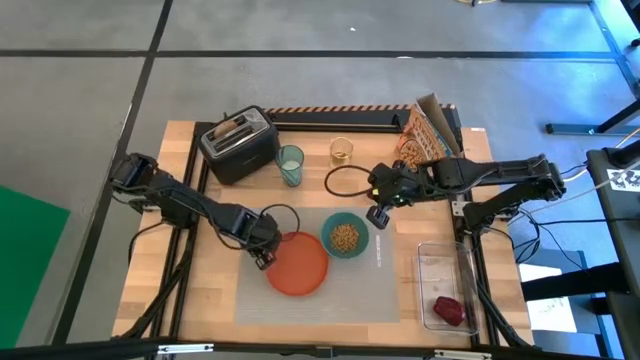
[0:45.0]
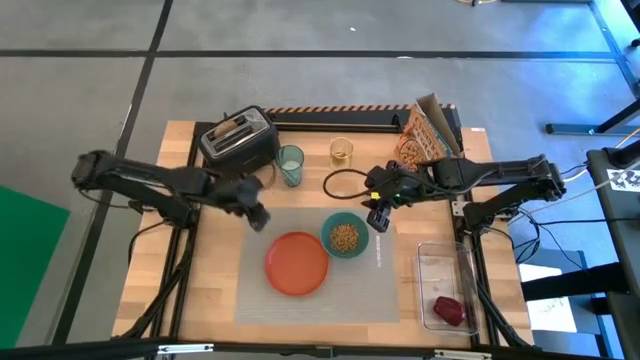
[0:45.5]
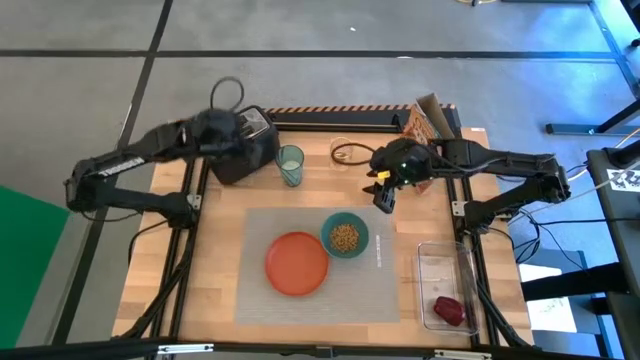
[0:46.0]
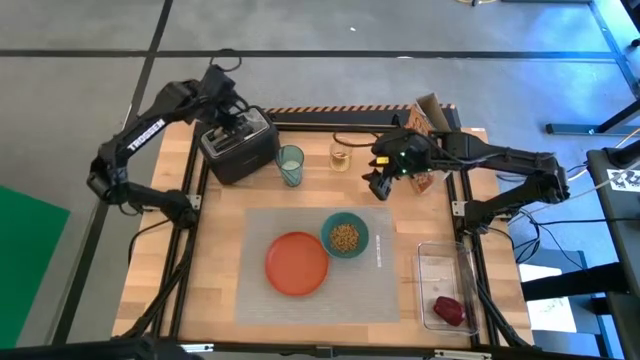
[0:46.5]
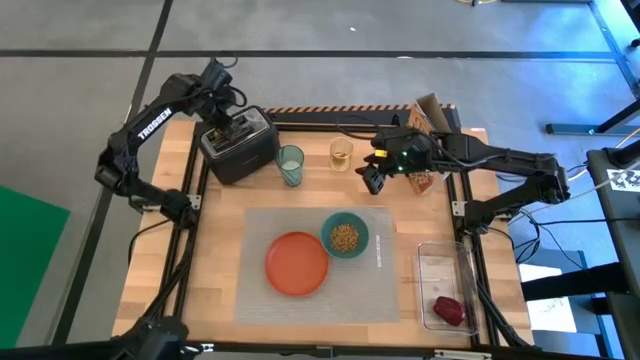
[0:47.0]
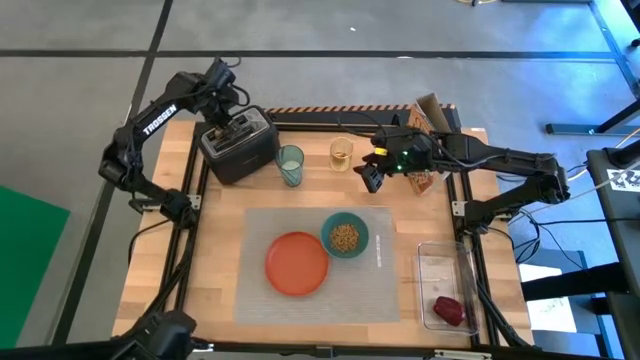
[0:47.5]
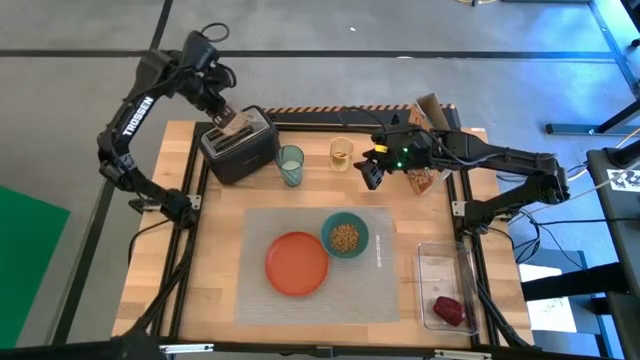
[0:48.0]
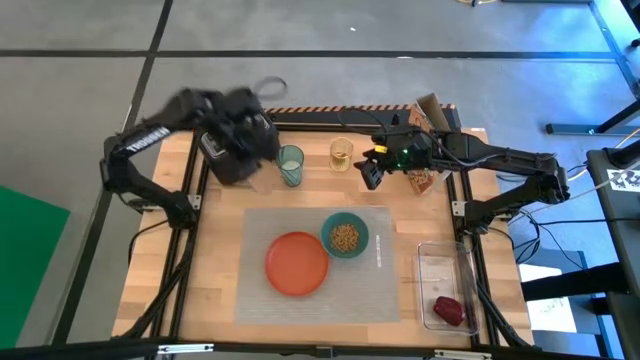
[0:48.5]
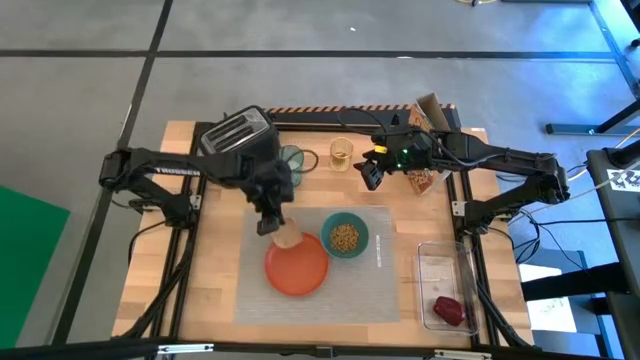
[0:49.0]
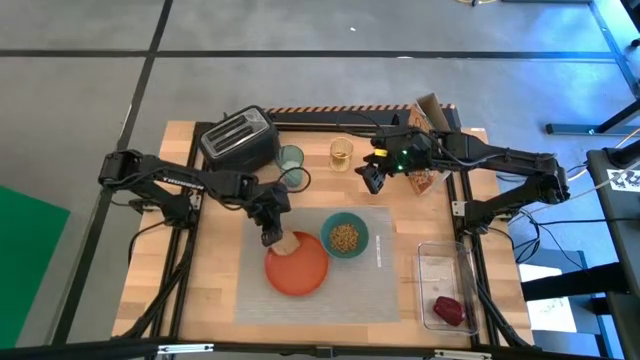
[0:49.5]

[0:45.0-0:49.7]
Task: Arrange a breakfast setting
Put the toasted bread on the plate

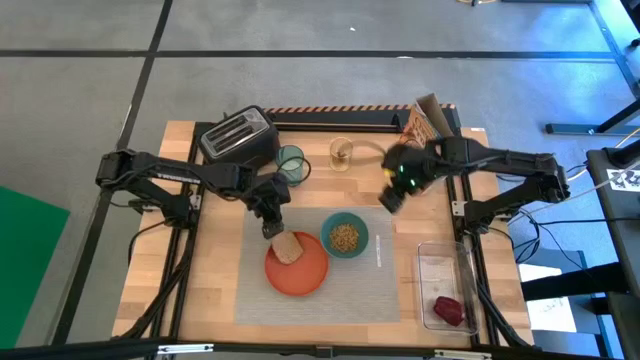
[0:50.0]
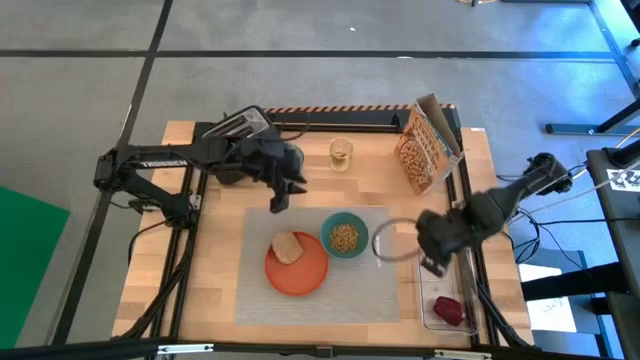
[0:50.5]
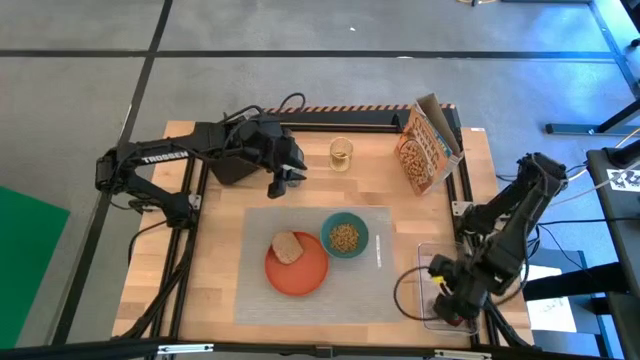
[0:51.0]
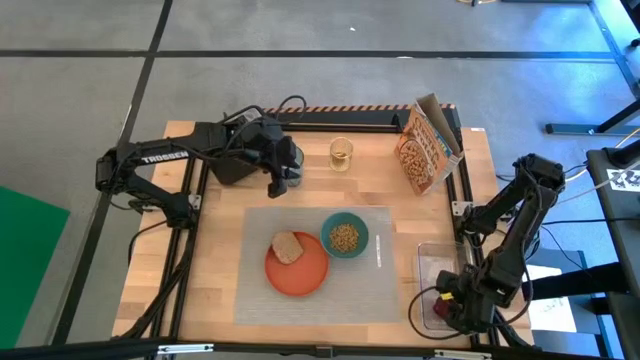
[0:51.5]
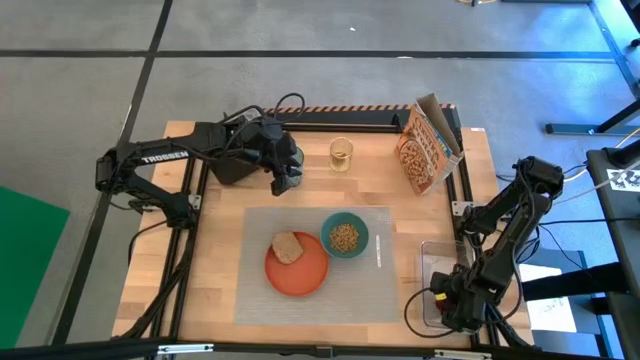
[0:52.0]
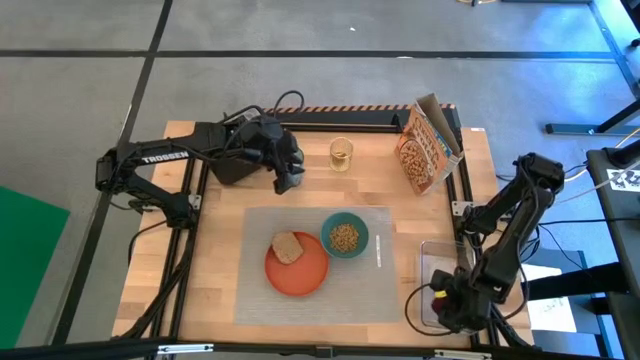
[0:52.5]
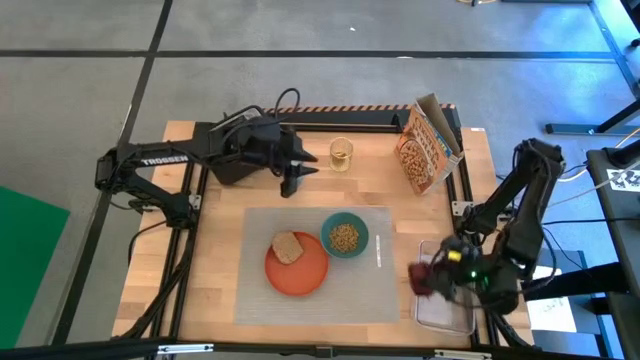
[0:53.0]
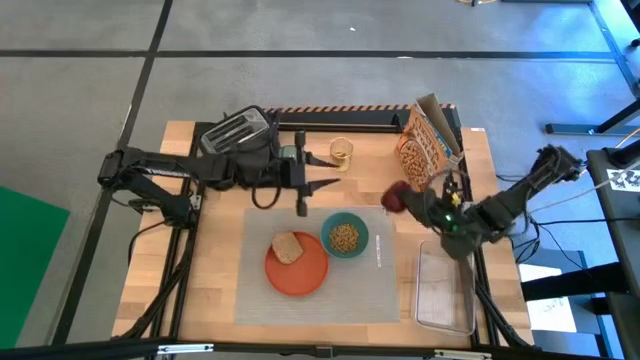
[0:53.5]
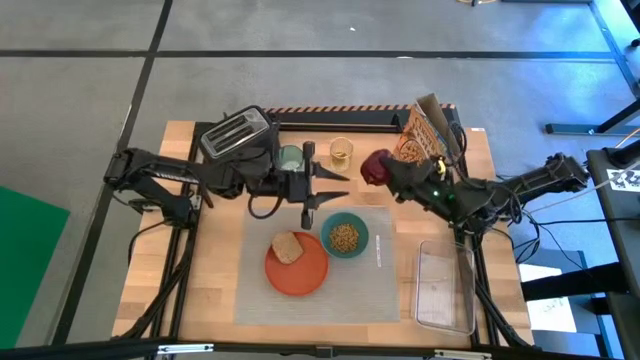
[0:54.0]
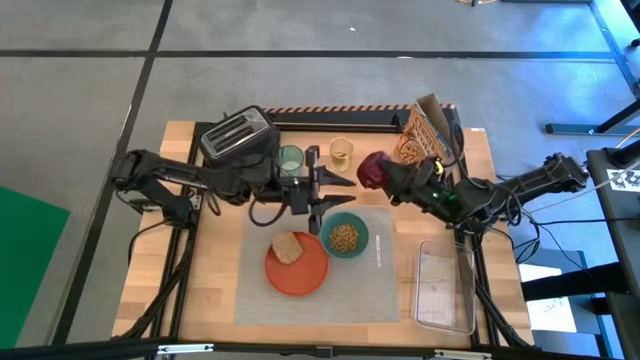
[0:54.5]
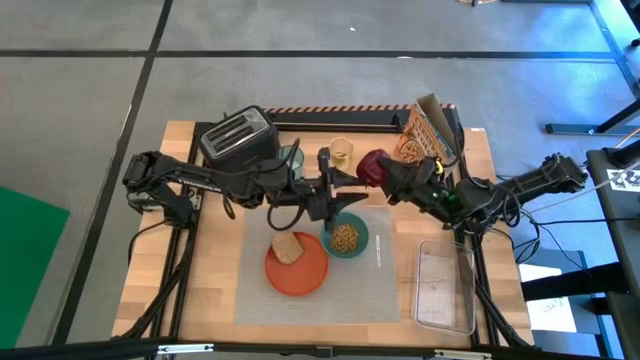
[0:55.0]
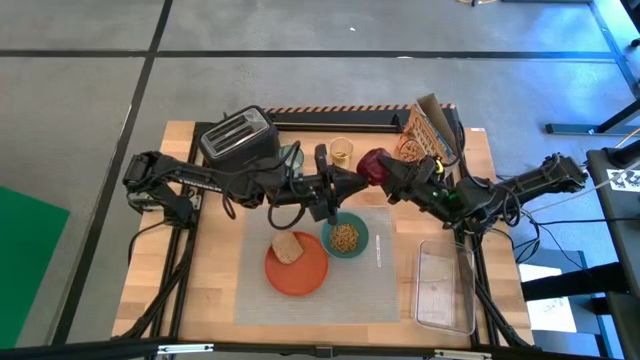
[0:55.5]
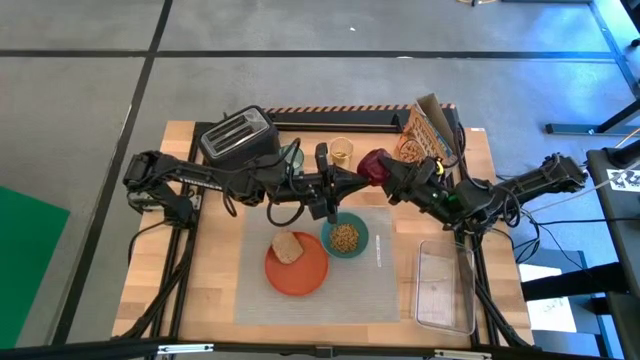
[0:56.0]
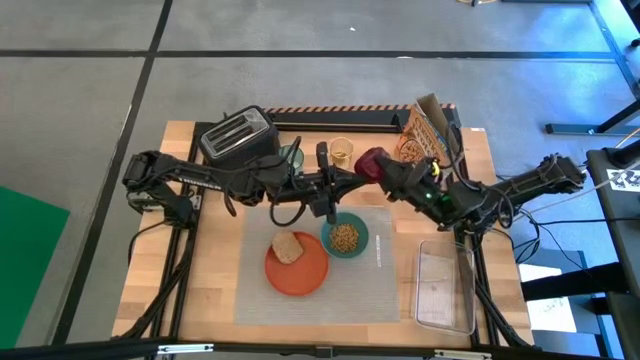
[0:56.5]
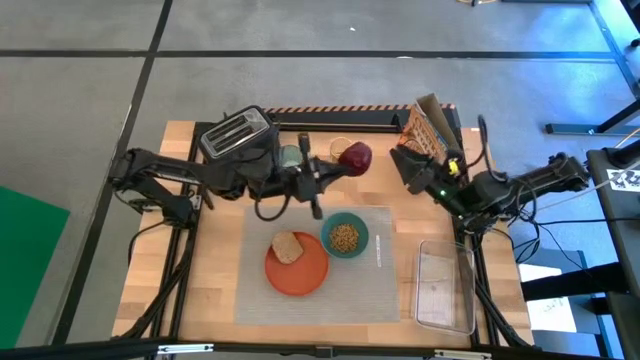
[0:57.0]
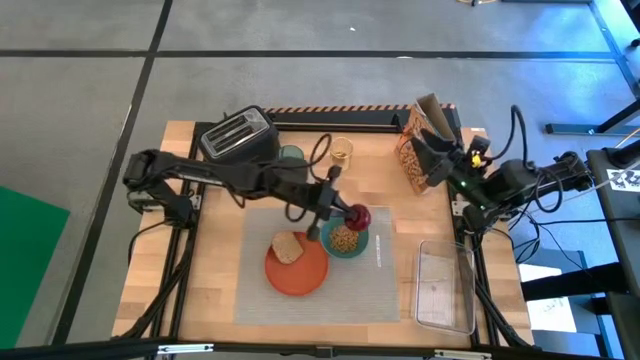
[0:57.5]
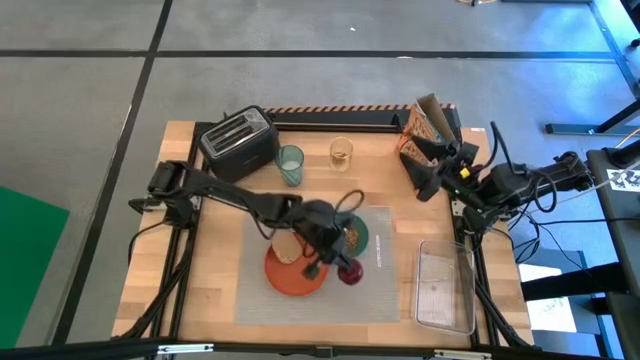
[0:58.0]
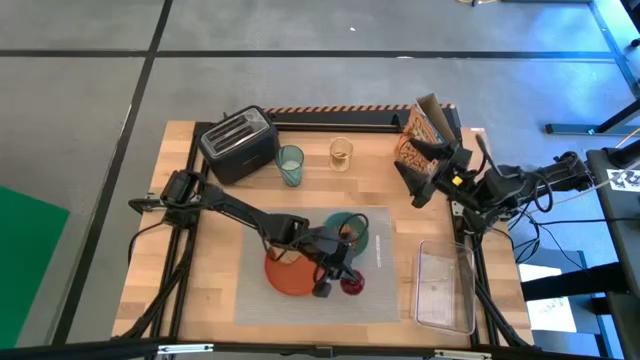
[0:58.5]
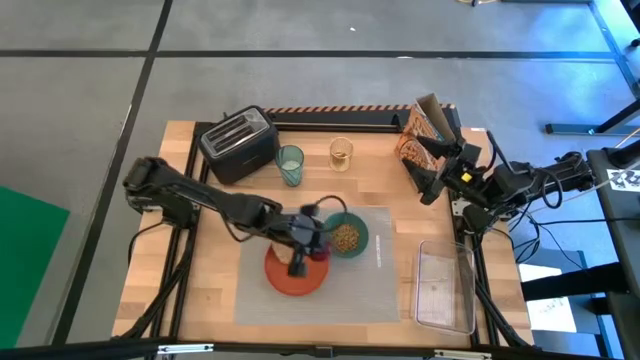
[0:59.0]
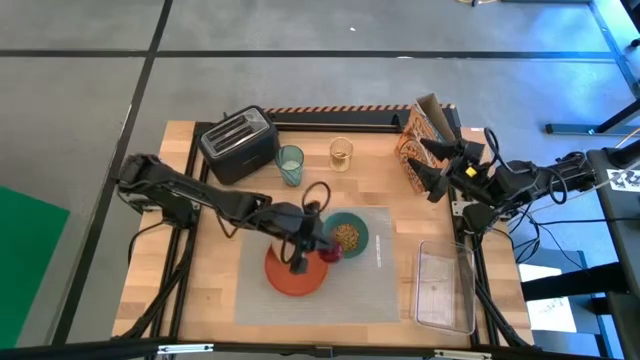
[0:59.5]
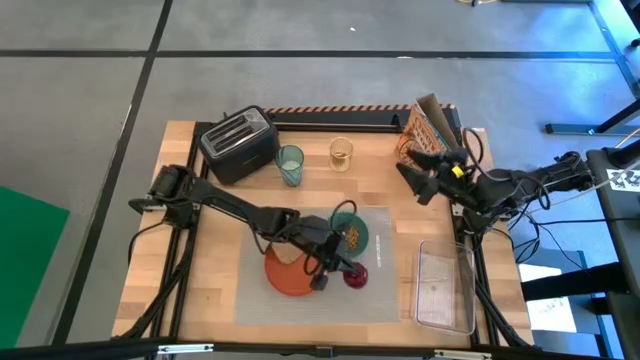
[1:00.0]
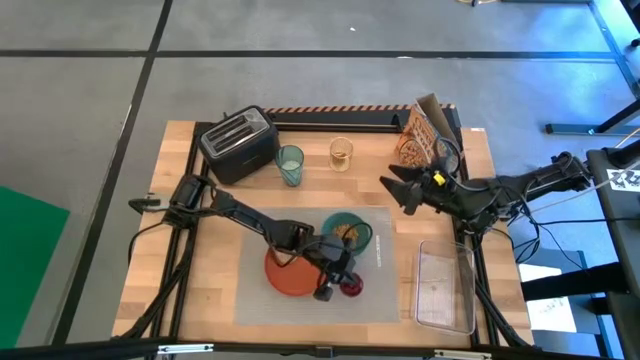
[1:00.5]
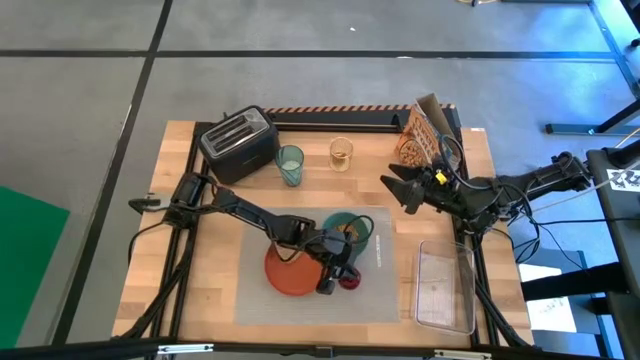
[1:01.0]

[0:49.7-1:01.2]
Put the apple on the placemat

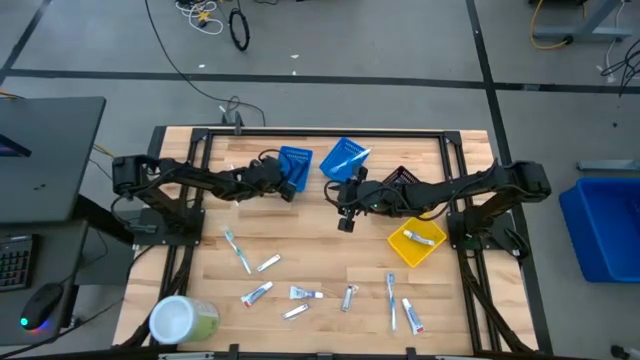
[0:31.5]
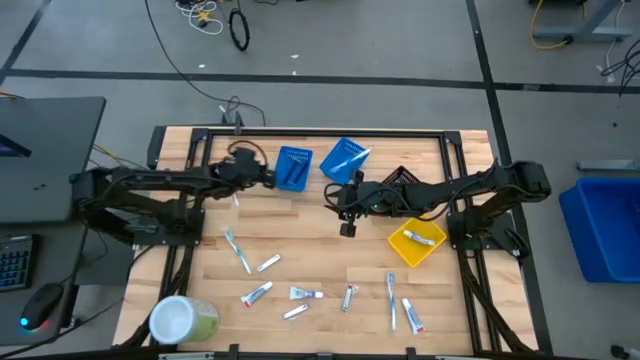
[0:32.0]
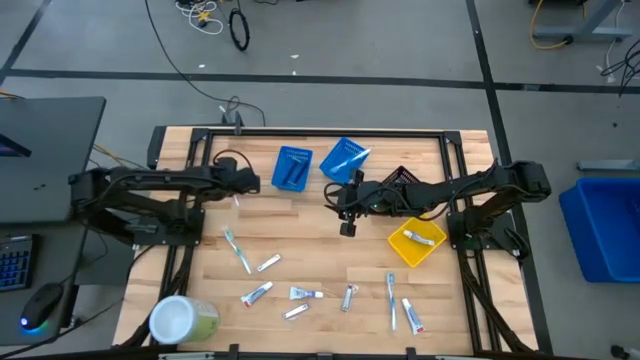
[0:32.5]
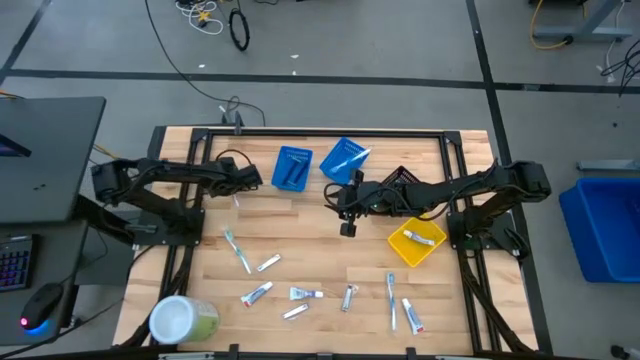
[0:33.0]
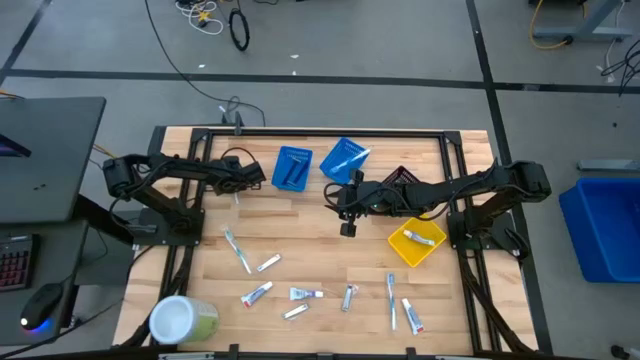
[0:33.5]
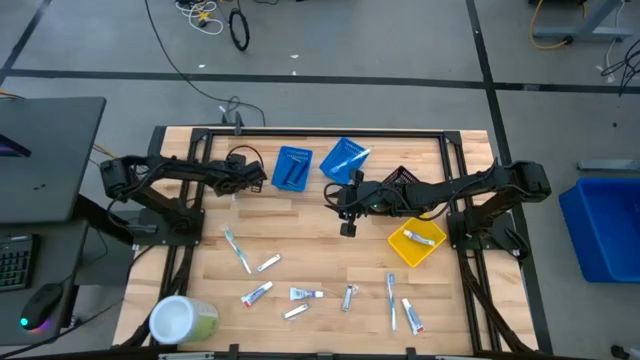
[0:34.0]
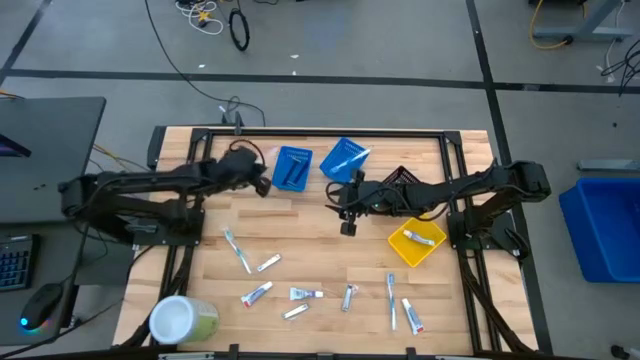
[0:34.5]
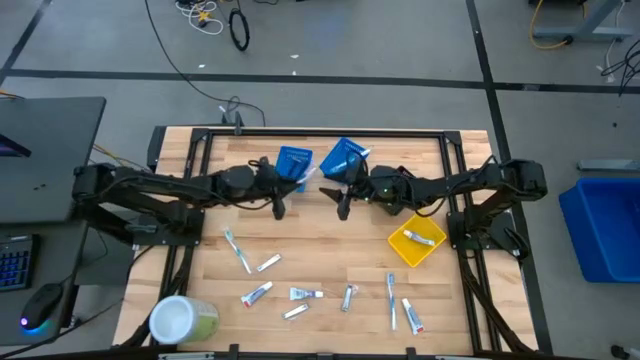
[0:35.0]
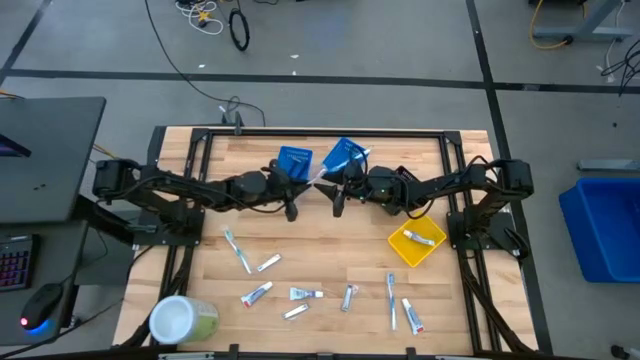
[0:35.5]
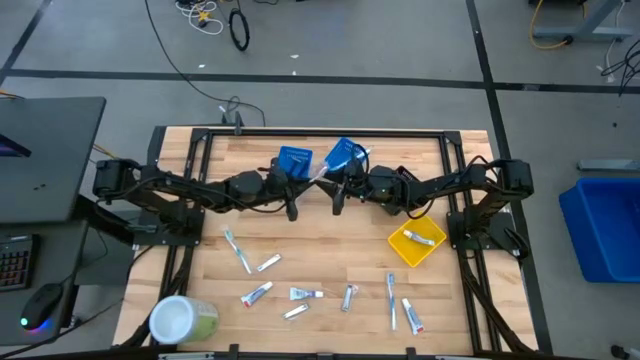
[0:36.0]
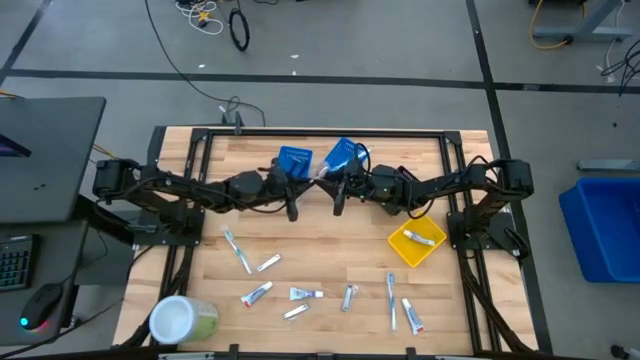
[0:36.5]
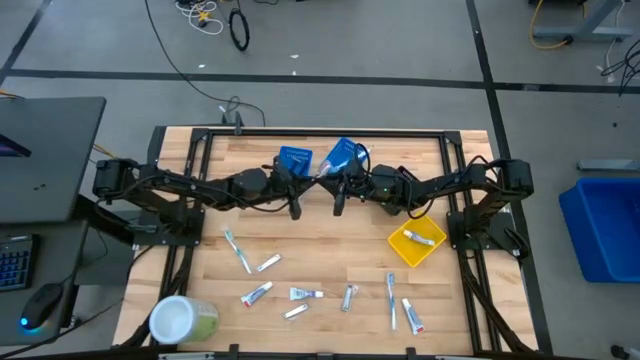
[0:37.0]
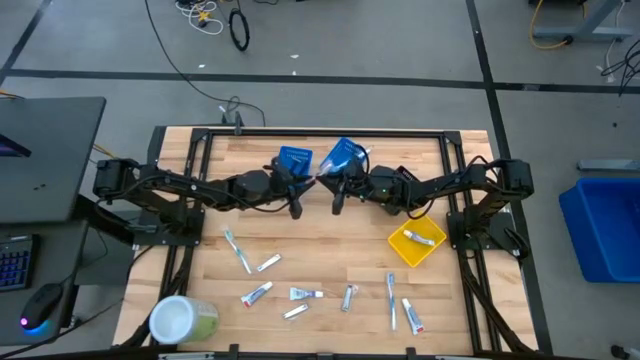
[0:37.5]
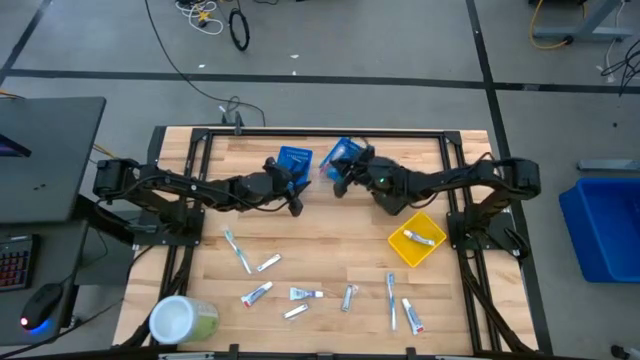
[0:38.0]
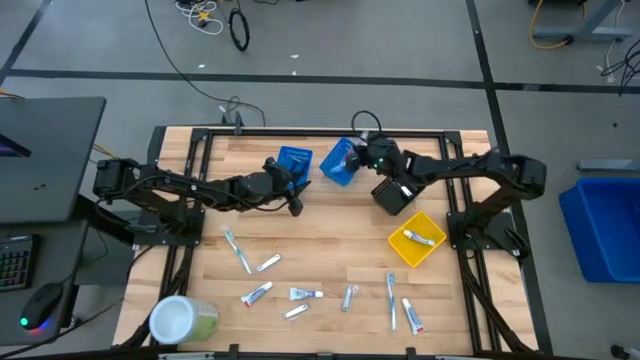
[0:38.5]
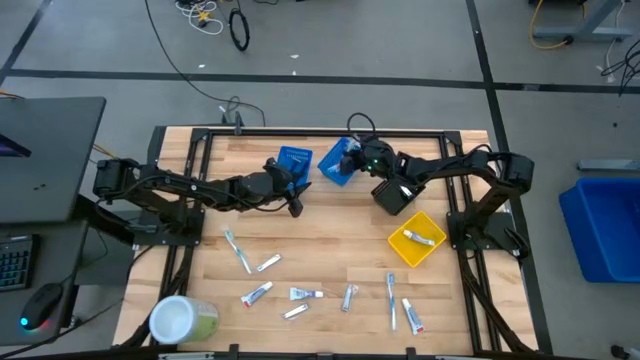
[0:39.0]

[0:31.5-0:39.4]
Task: Pick & Place Travel size toiletries
Put the orange toothbrush into the right blue basket
